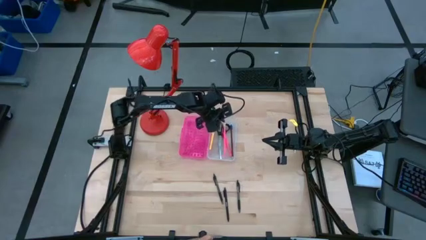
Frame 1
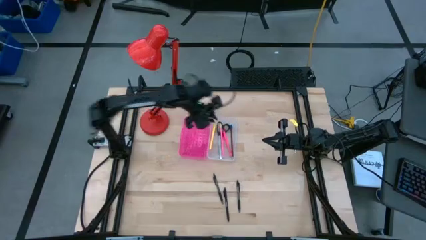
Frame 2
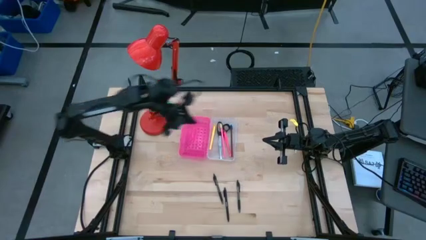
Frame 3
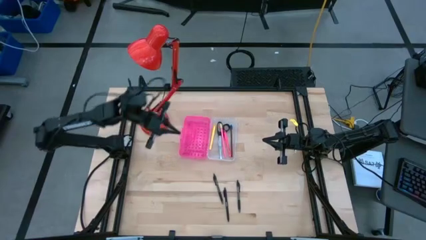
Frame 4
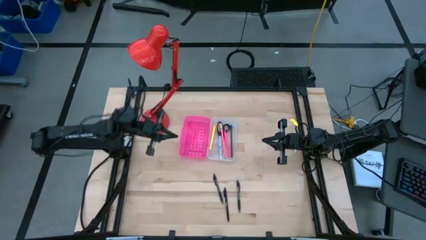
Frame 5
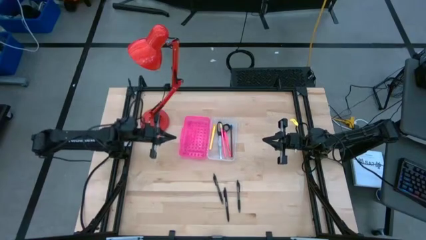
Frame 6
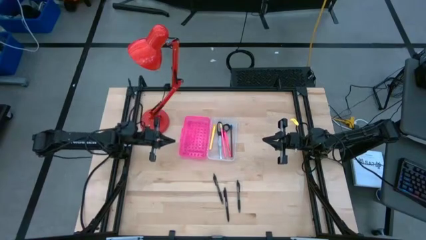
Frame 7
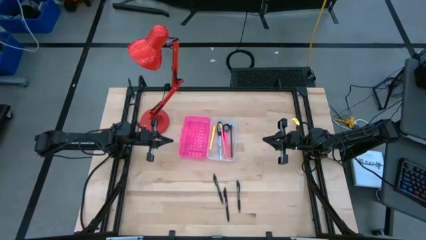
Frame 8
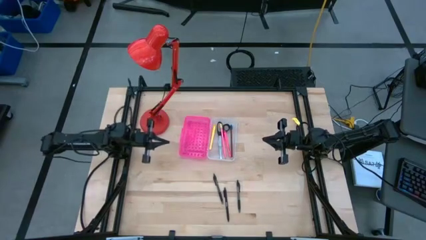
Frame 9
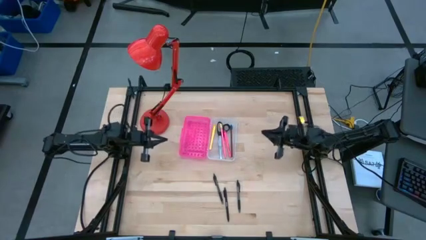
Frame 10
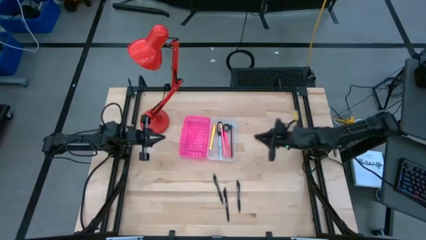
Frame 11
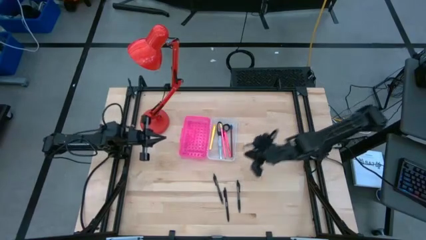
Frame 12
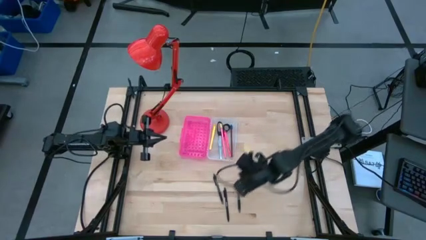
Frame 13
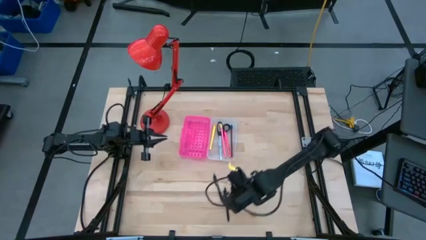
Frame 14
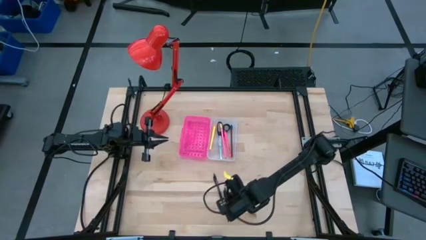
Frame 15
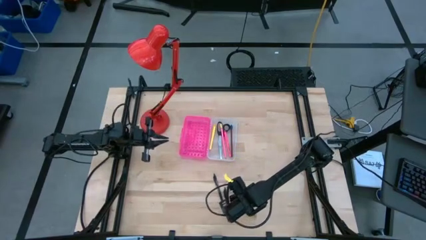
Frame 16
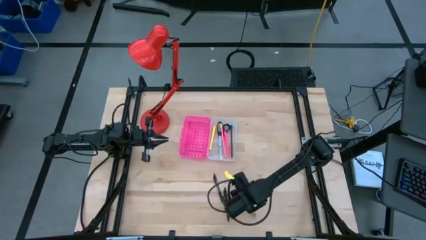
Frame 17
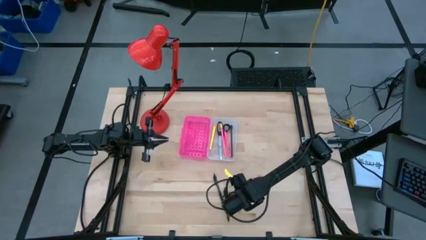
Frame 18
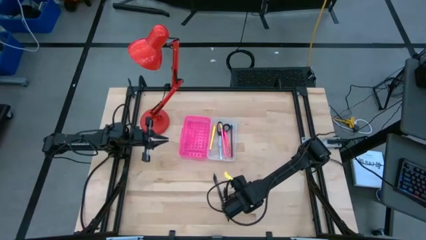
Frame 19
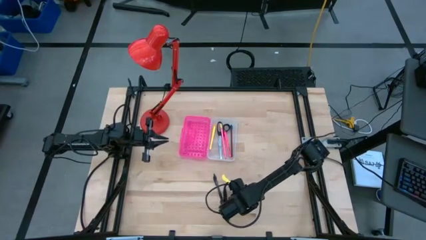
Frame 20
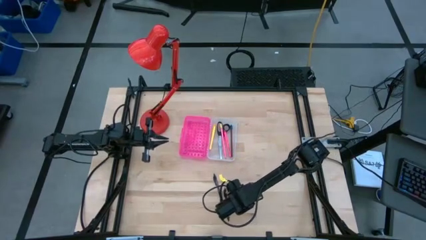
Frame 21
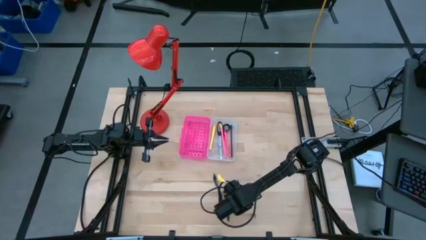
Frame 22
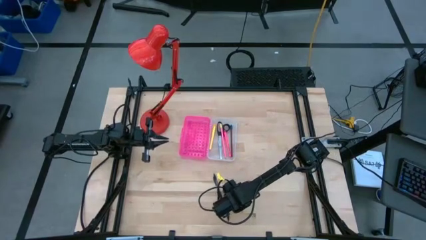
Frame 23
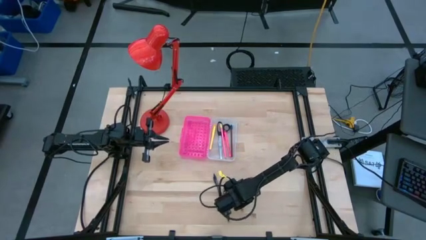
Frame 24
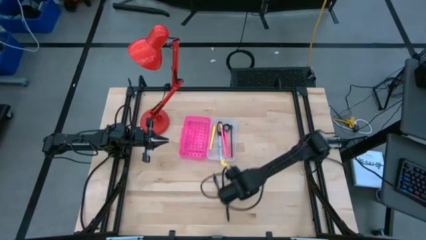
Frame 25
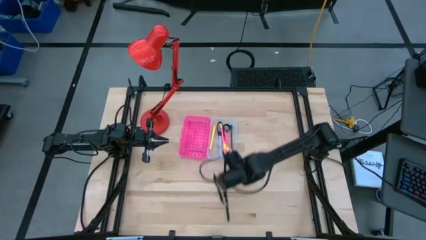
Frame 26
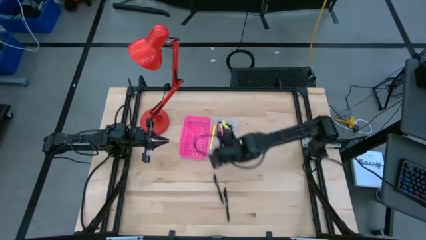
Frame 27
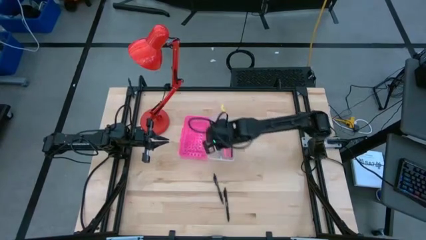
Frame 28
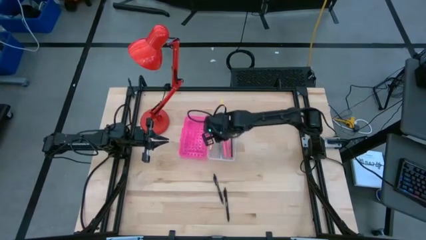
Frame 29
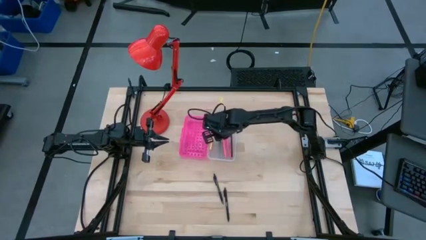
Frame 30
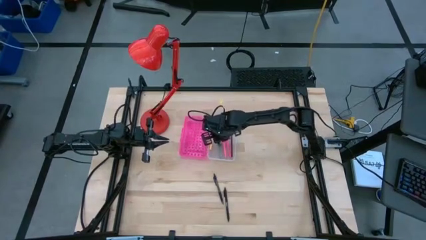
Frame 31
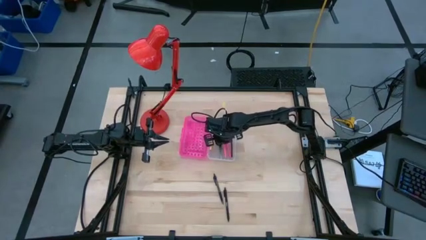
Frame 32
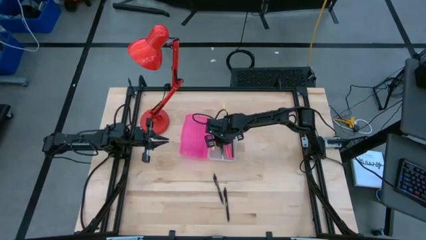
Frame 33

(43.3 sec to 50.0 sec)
Task: Pick & place school supplies into a supply box
Put the right black pen into the supply box

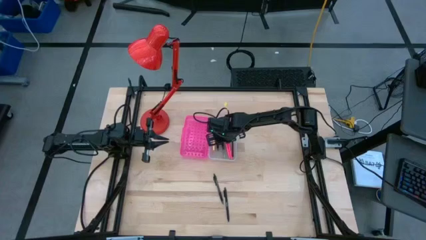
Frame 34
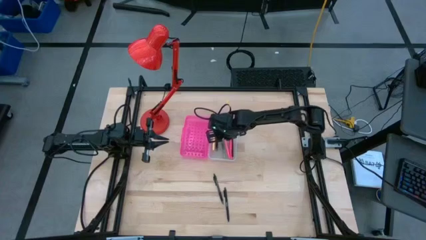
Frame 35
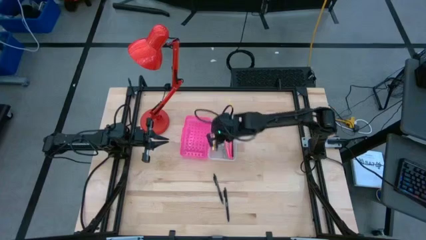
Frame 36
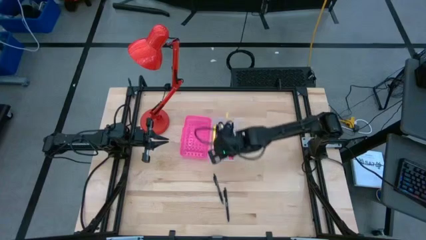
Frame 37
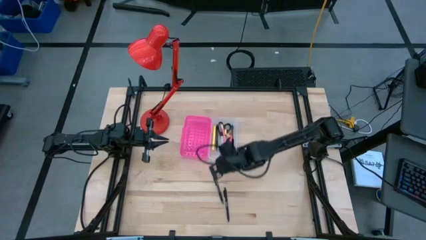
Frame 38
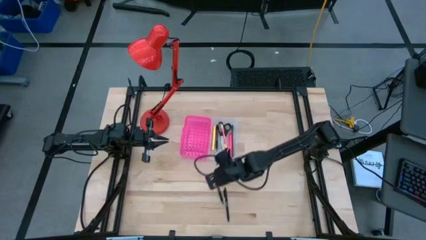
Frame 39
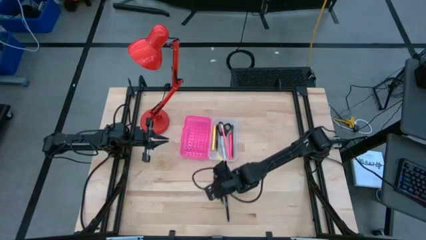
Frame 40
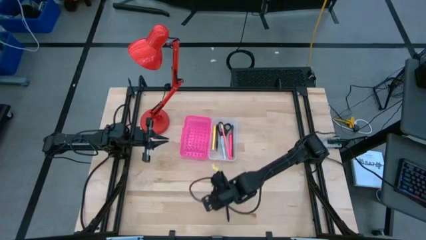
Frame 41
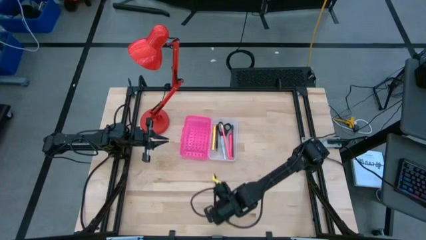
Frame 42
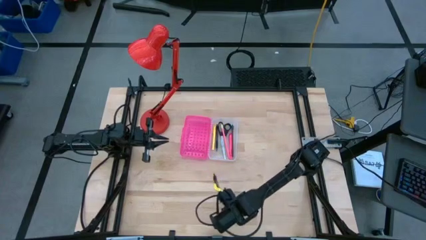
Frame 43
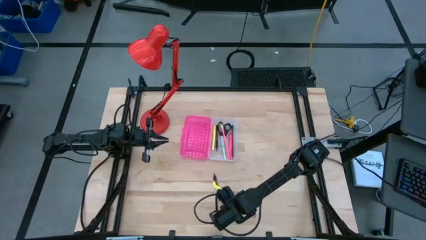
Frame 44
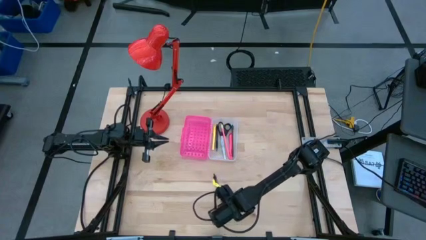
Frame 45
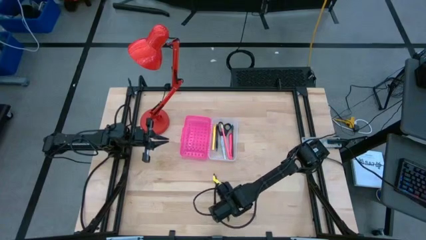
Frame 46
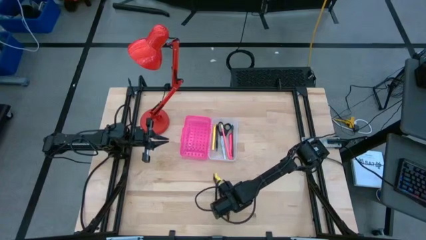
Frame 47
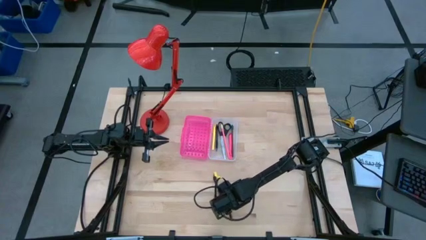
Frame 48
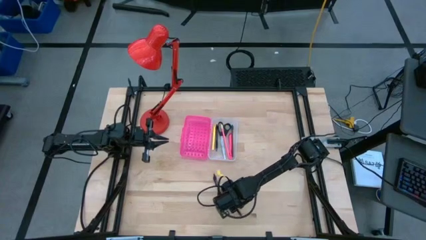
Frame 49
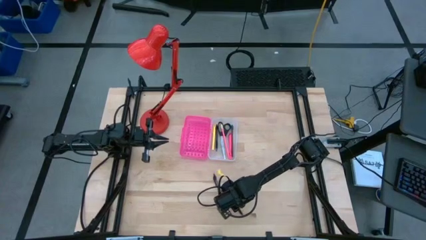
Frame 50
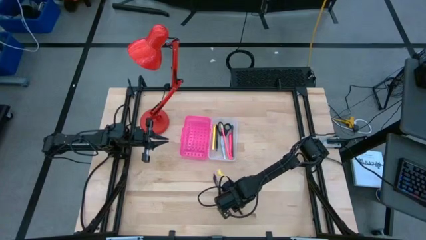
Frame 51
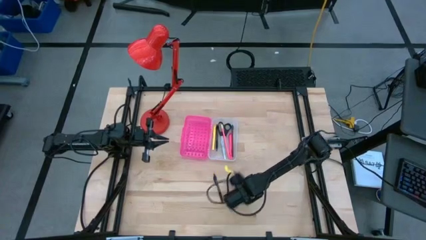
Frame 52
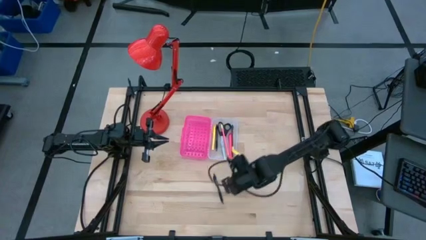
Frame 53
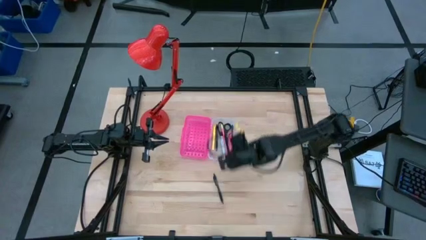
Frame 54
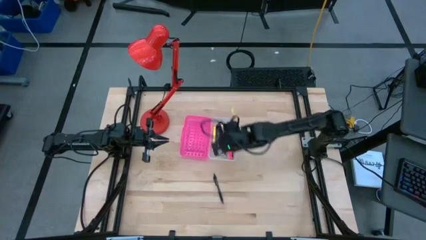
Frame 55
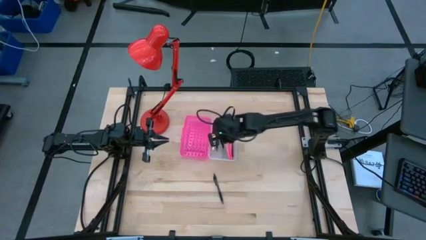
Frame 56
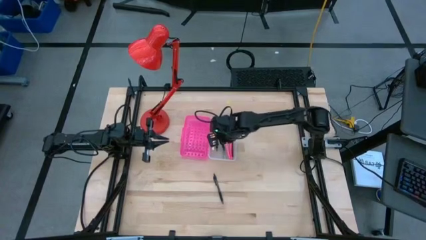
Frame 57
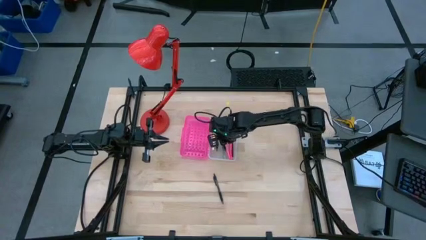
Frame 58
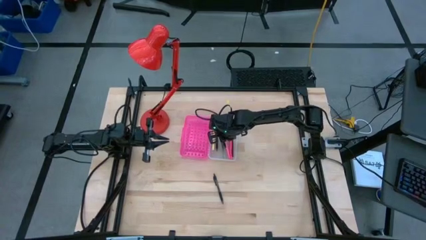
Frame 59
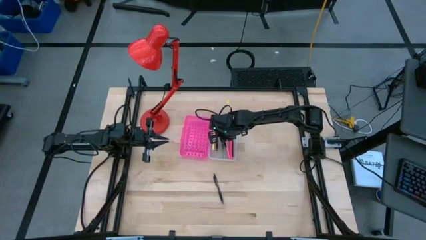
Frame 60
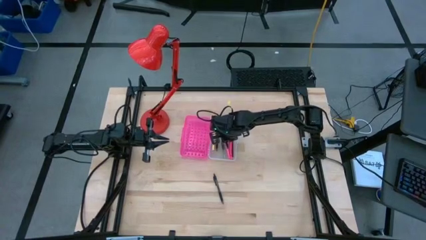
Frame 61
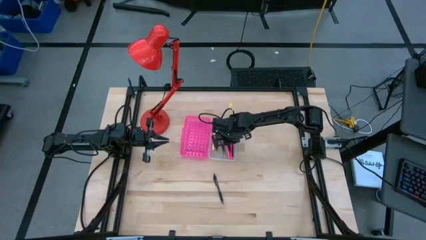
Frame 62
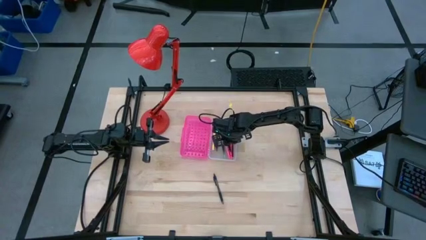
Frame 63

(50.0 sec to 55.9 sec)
Put the right black pen into the supply box

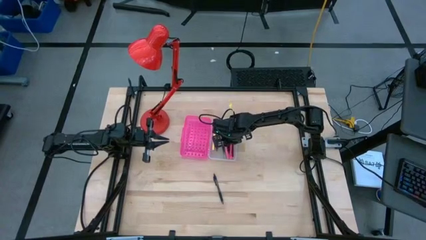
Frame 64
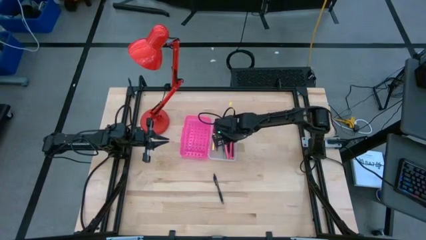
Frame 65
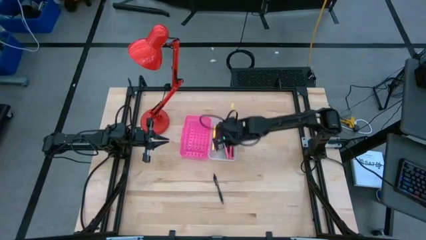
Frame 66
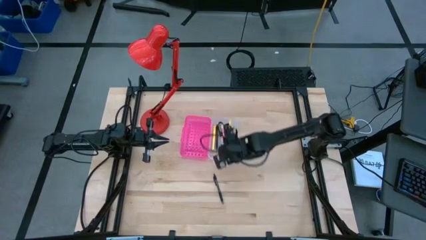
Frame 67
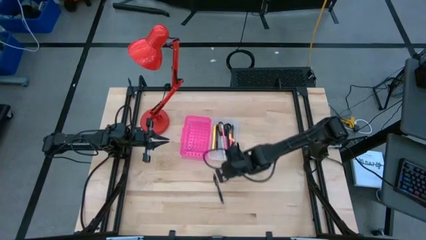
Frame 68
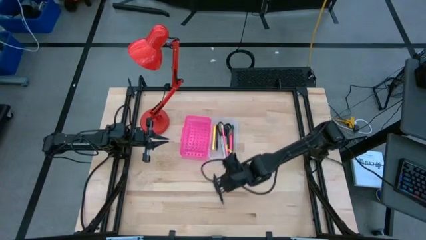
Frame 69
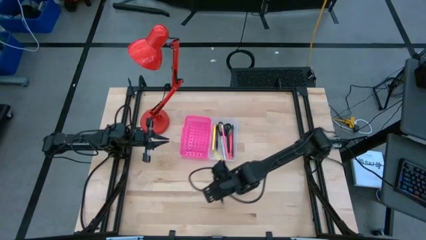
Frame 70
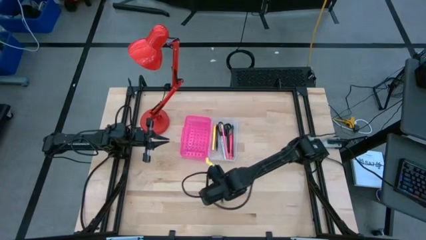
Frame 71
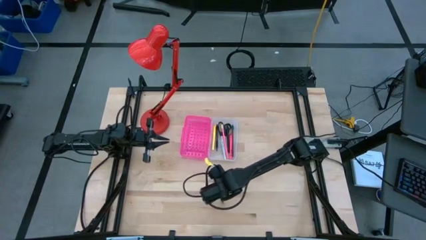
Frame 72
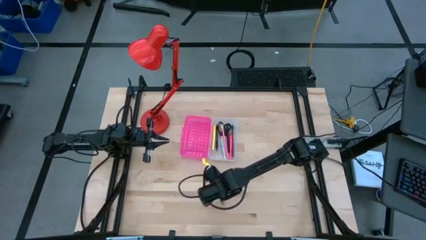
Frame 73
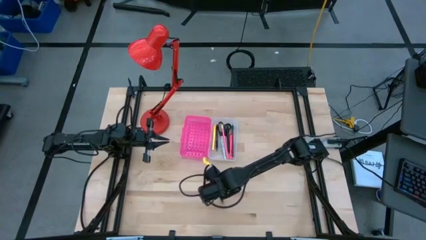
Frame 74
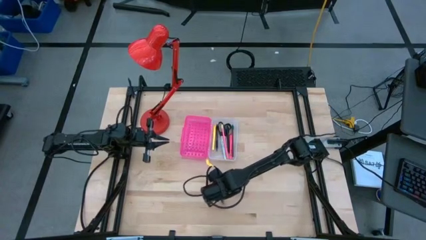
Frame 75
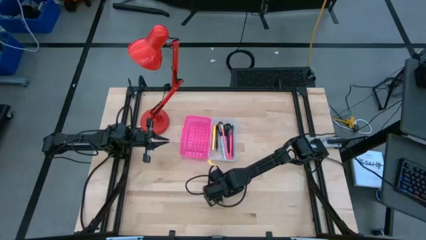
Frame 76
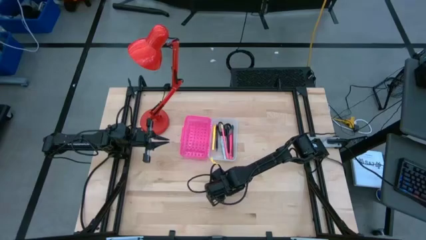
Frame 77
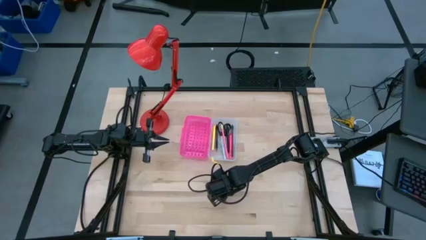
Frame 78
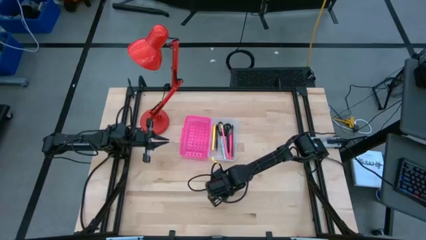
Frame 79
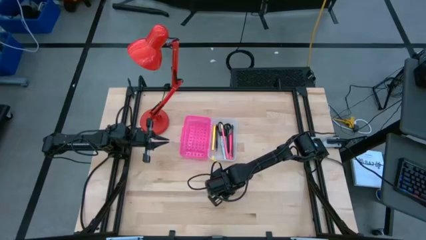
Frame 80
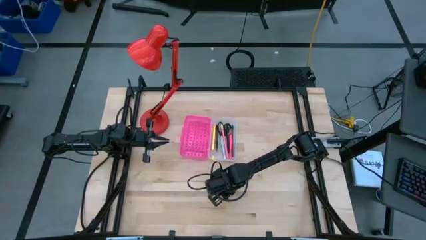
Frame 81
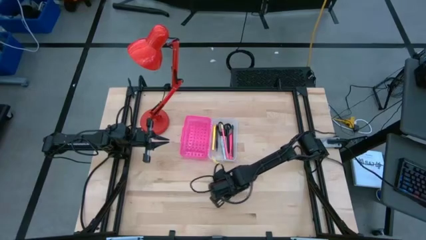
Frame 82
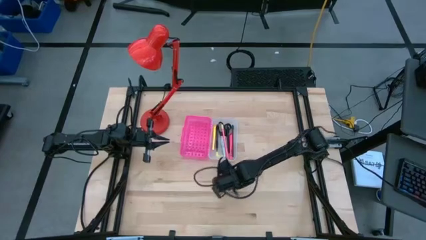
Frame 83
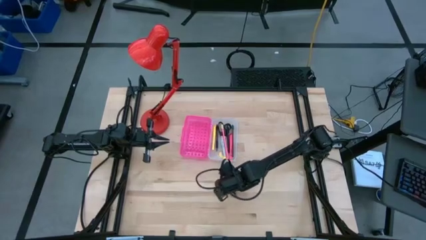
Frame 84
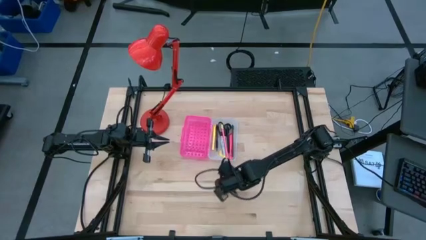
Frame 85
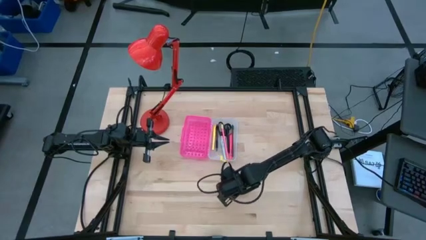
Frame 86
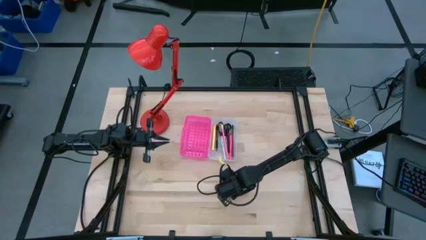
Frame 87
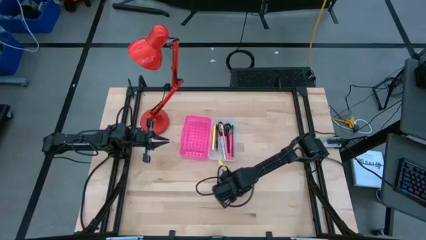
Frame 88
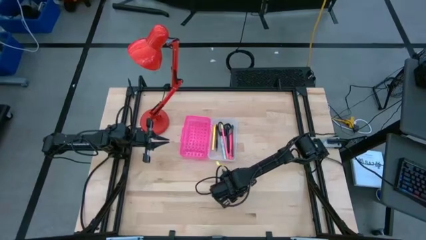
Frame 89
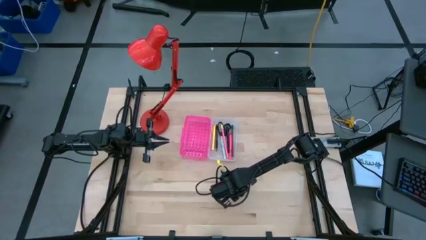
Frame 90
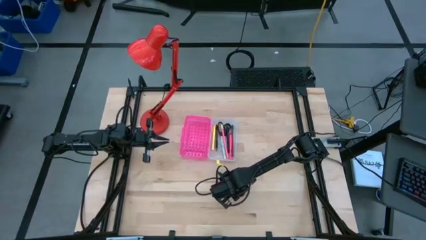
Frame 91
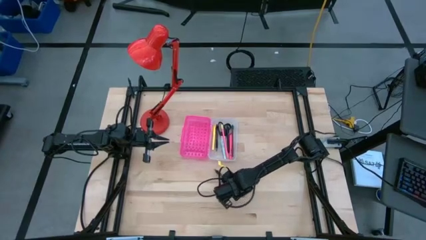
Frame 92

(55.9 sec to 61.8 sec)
Put the black pen into the supply box
